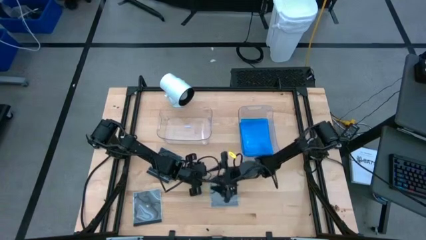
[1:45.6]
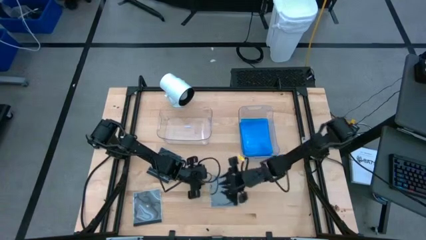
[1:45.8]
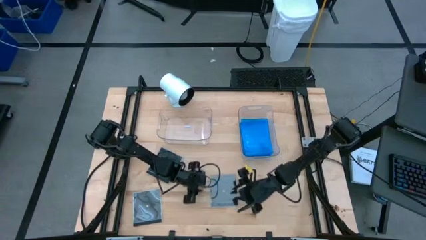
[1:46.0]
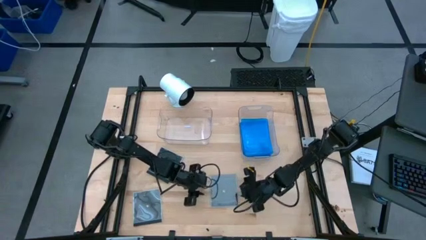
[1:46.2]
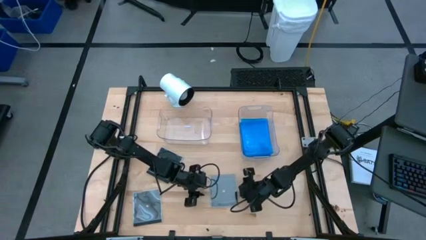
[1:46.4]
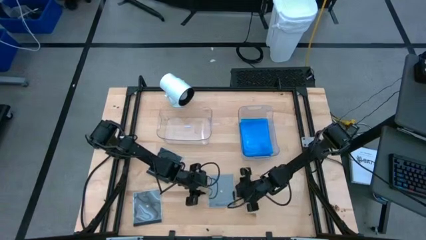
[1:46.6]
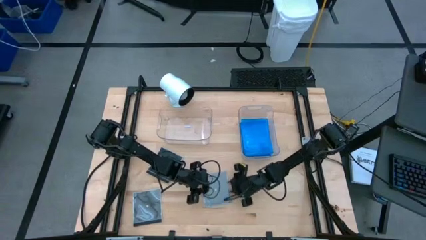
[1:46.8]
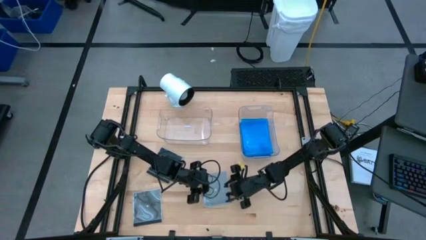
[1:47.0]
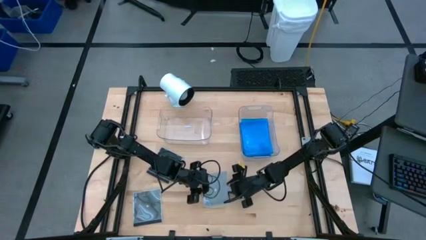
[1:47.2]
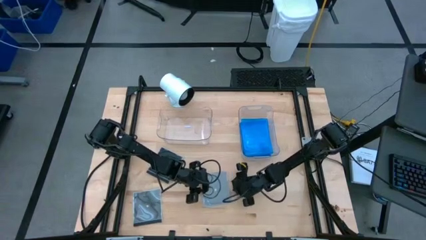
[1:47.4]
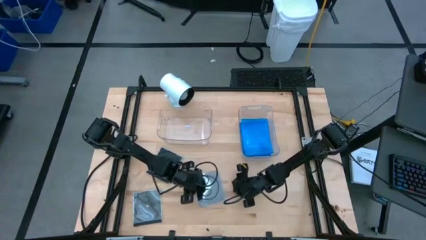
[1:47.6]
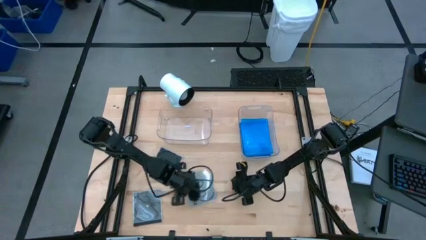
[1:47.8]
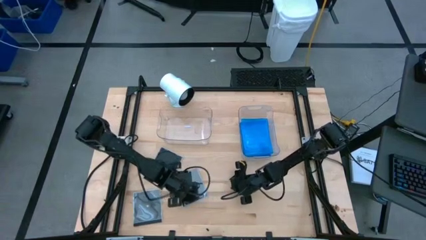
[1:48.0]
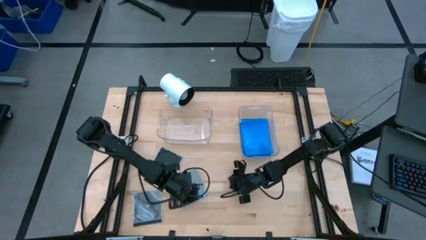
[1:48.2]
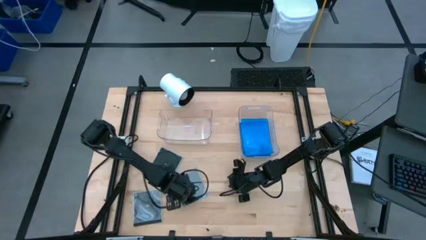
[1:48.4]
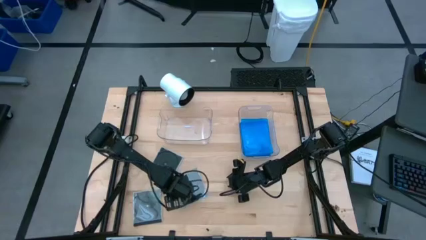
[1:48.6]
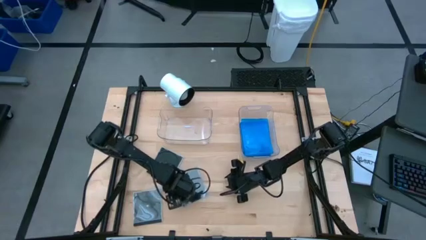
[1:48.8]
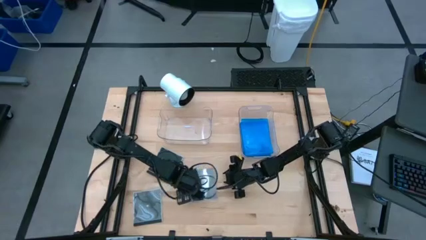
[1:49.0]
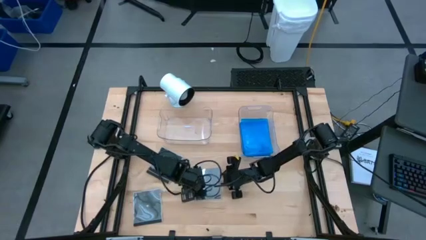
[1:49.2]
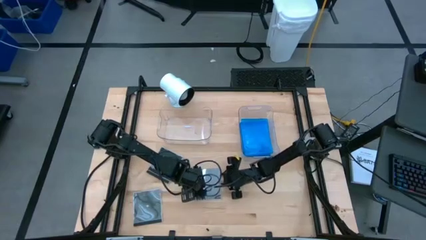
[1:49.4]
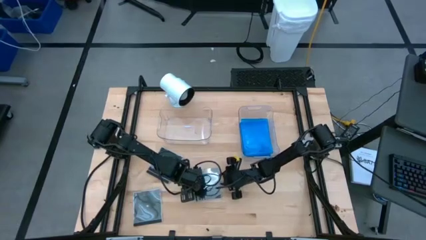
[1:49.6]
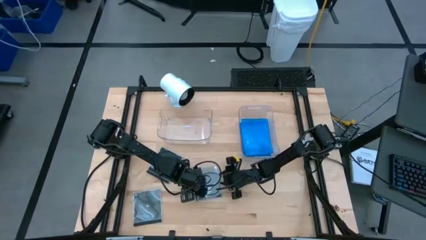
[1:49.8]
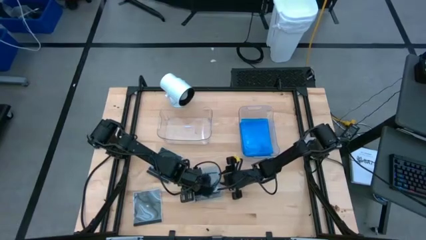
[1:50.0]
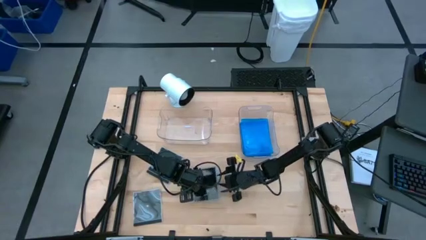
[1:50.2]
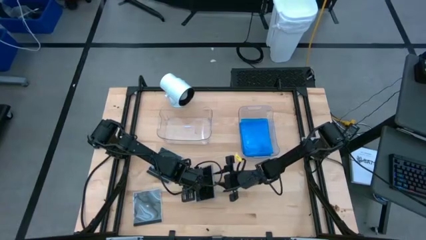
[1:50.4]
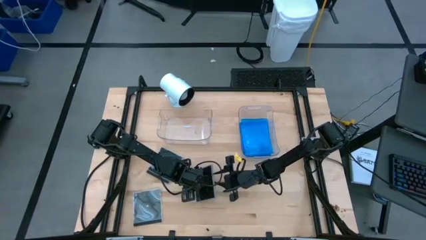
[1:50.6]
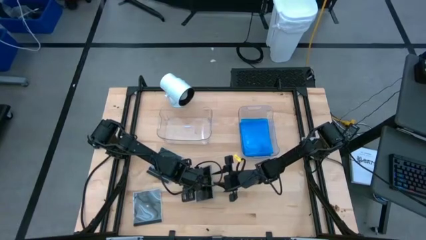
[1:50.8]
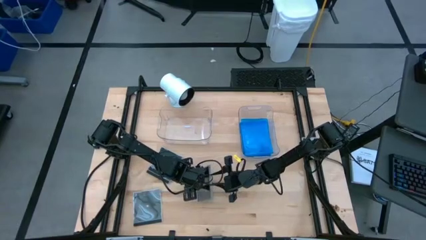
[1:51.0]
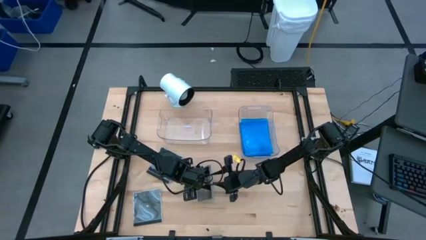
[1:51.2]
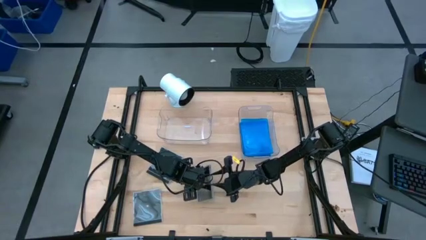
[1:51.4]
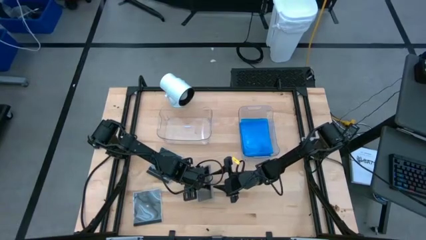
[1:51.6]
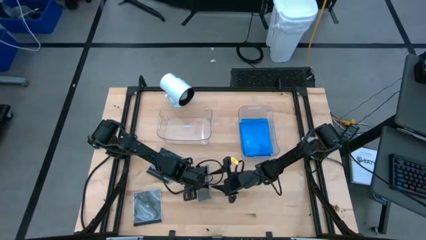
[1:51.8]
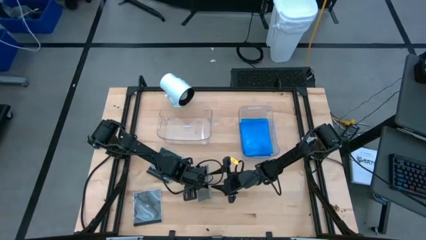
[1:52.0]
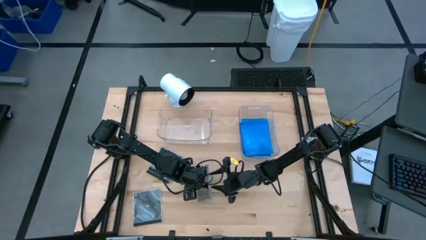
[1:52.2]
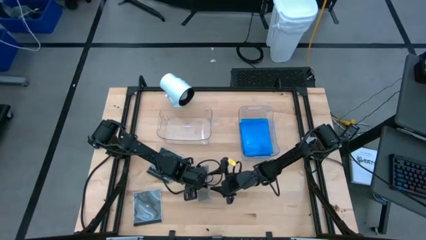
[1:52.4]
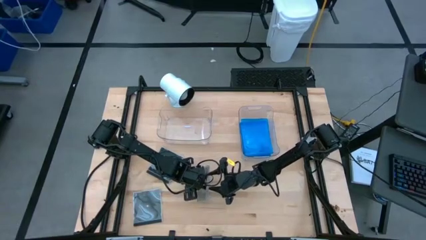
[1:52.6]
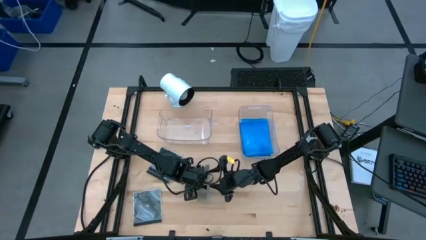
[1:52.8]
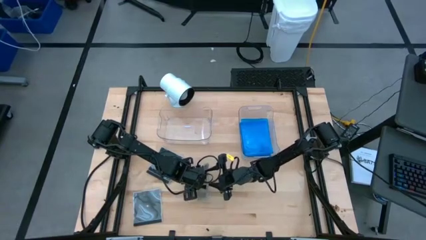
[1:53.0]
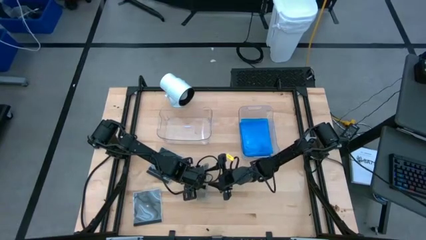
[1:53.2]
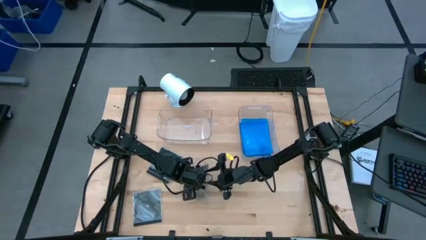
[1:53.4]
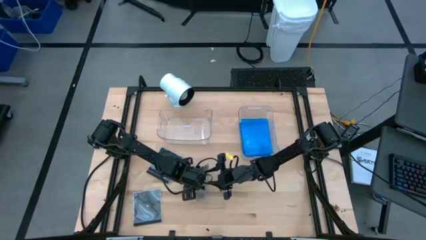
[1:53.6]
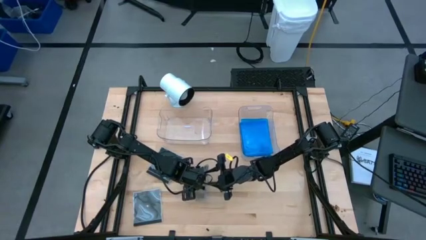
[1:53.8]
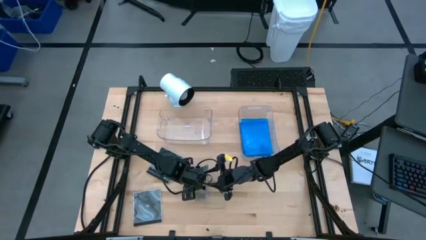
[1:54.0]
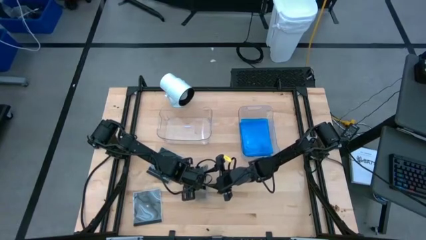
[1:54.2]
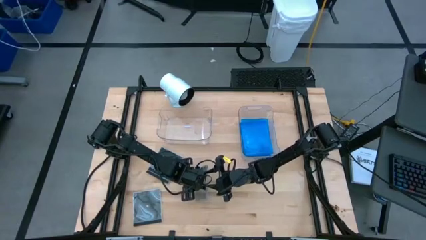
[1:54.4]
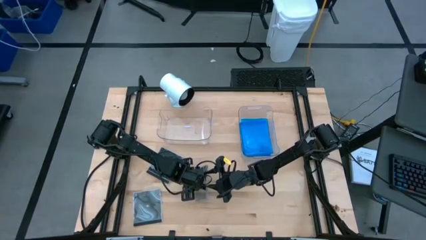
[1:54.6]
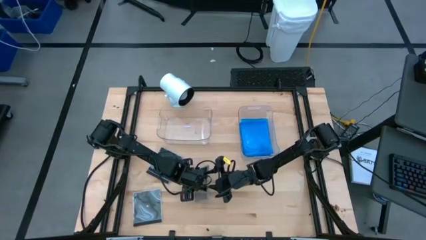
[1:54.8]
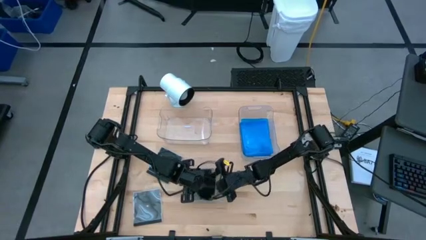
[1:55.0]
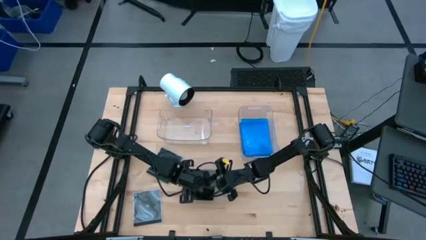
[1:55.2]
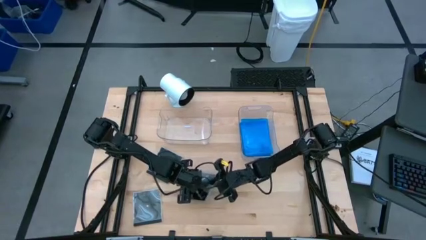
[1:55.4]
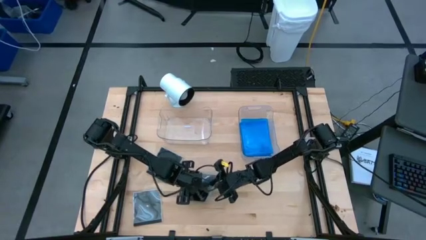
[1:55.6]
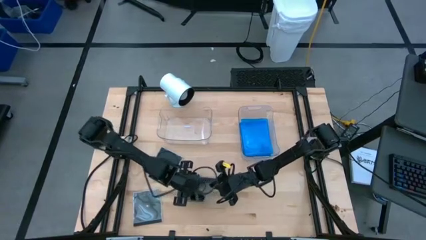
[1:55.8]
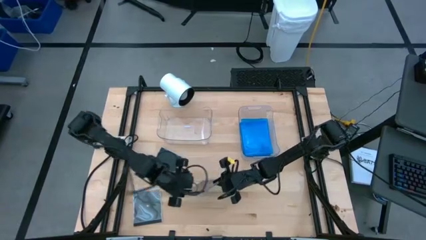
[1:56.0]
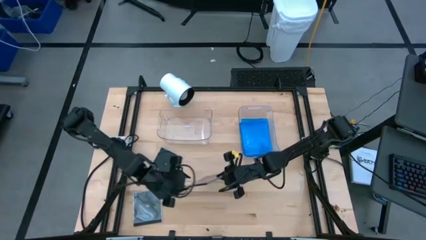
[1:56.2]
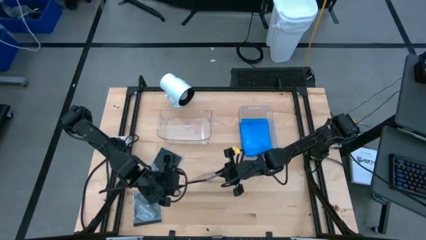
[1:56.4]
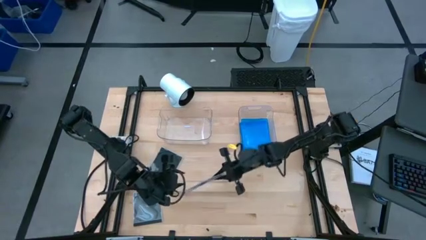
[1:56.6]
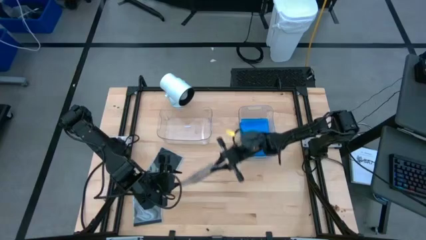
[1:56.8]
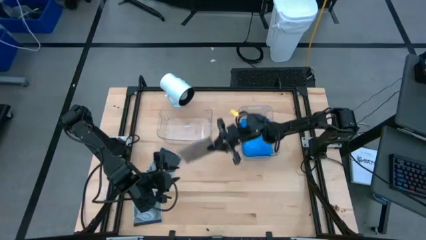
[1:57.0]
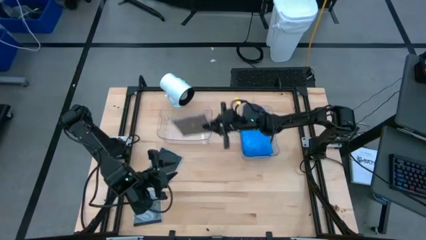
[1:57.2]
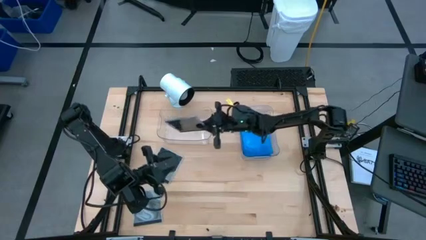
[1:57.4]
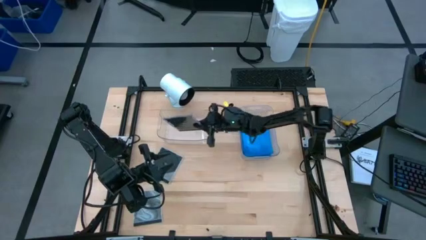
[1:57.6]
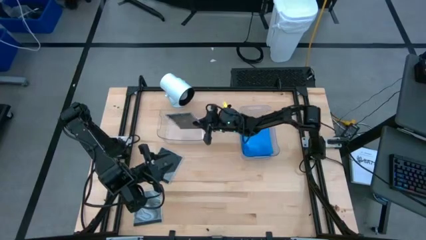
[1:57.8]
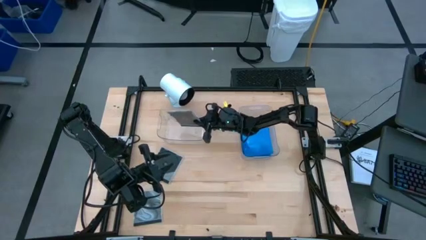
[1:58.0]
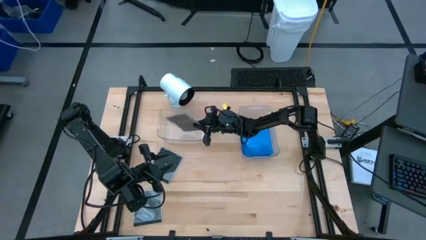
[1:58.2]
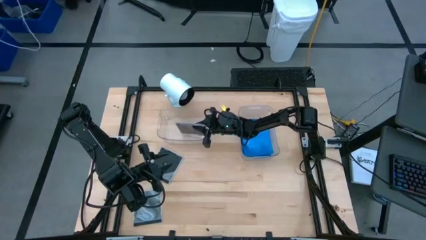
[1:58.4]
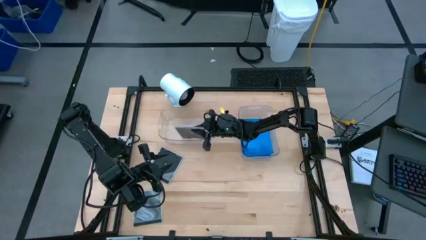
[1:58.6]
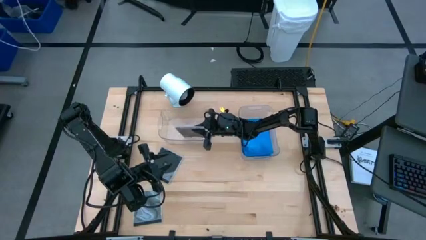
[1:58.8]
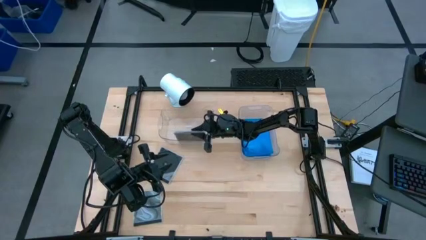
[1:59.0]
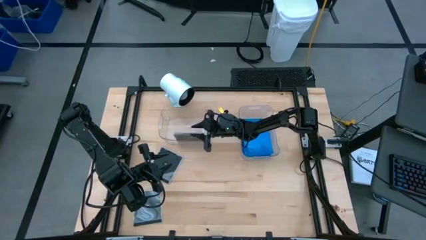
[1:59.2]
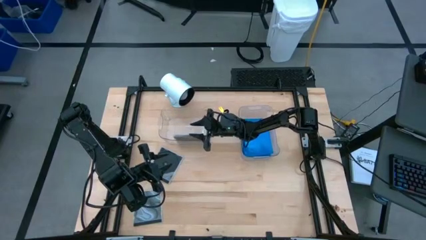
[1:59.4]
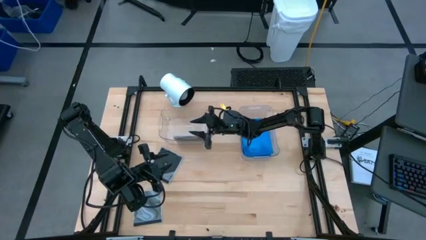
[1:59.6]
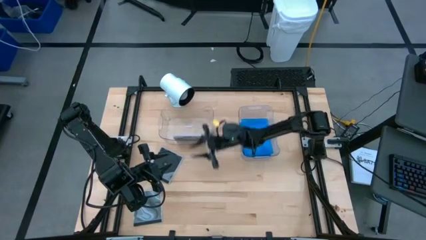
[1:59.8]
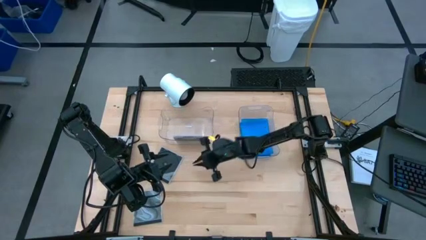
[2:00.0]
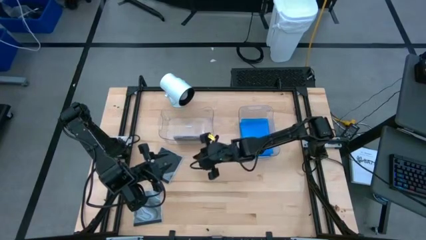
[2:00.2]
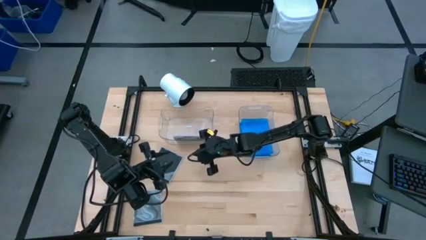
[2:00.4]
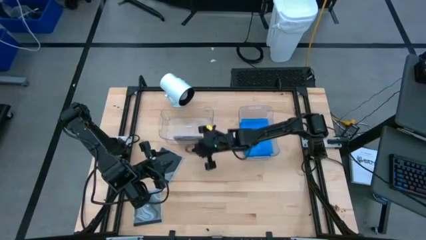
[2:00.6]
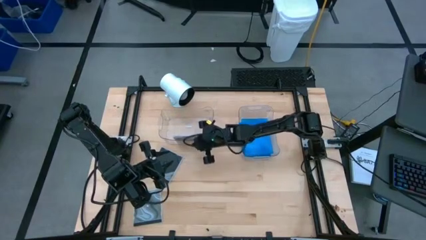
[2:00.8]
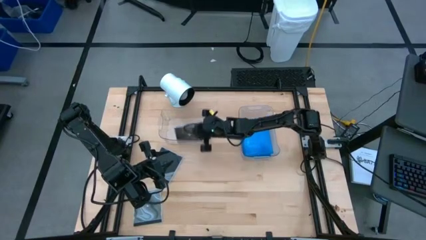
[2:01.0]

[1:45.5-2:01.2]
Task: Pick & place jewel cases by type
Put the top right black cd case into the left transparent bin
